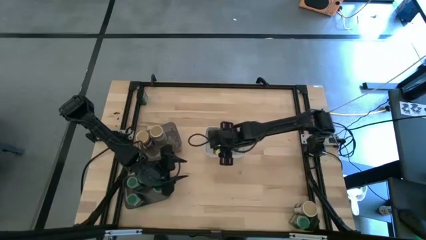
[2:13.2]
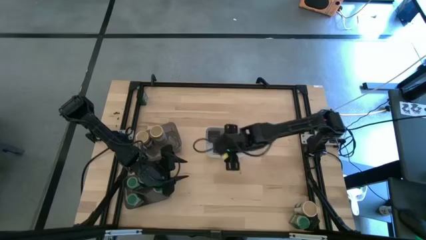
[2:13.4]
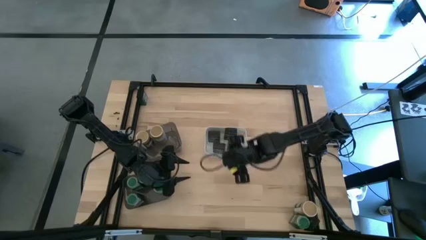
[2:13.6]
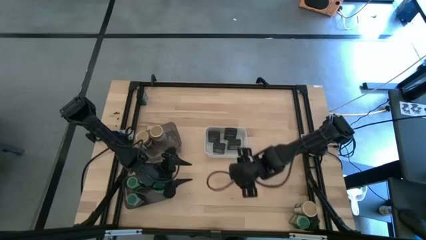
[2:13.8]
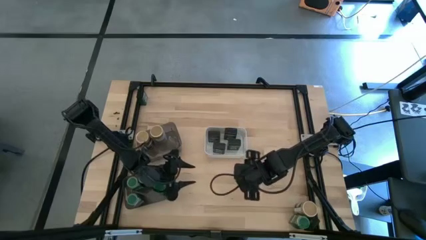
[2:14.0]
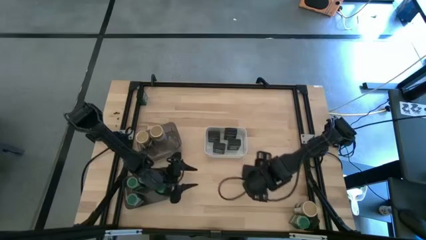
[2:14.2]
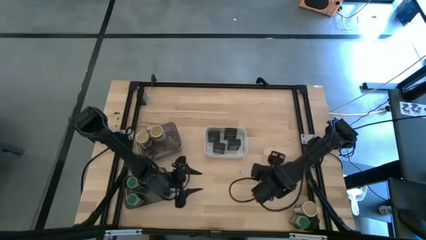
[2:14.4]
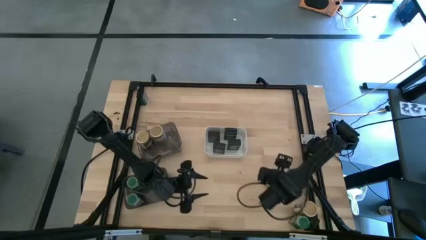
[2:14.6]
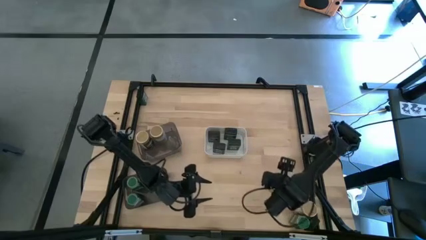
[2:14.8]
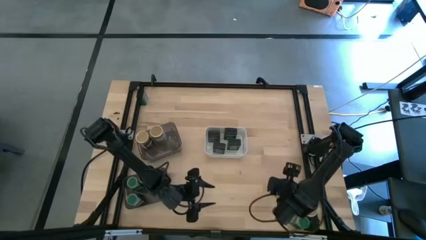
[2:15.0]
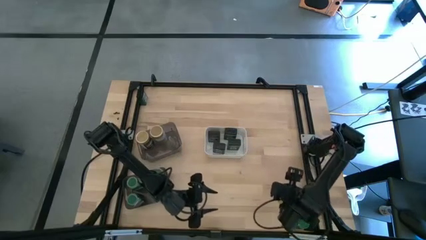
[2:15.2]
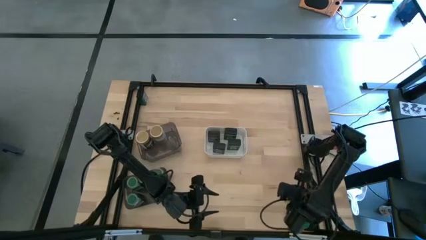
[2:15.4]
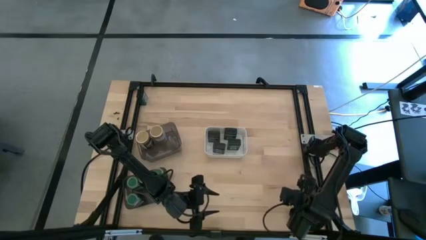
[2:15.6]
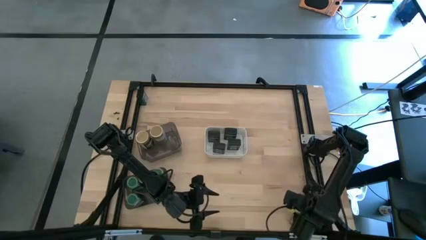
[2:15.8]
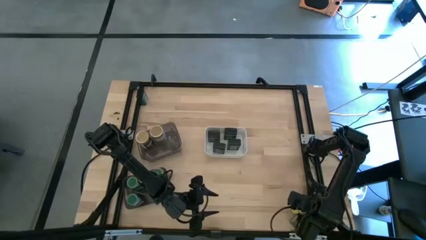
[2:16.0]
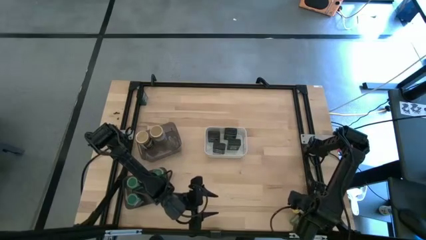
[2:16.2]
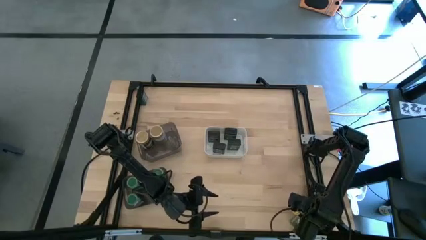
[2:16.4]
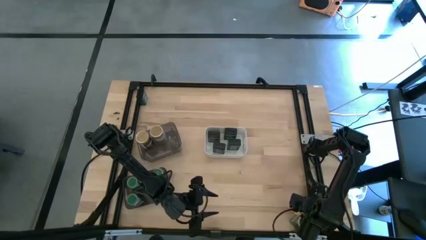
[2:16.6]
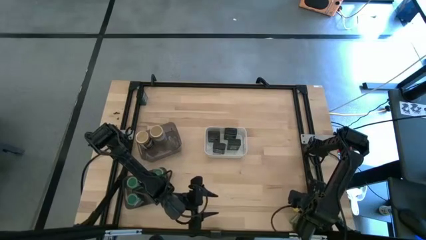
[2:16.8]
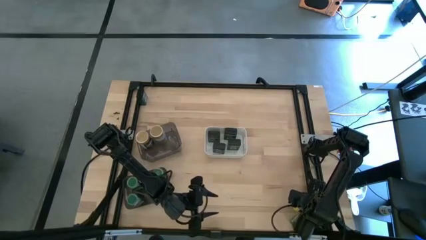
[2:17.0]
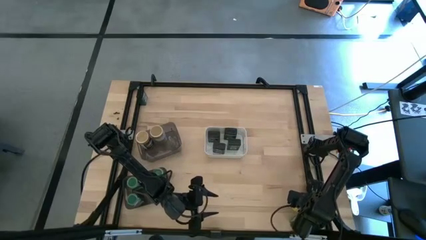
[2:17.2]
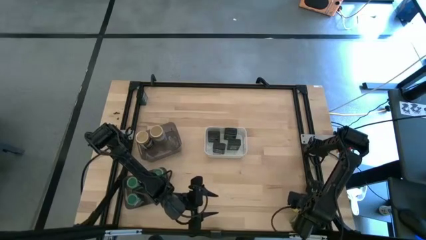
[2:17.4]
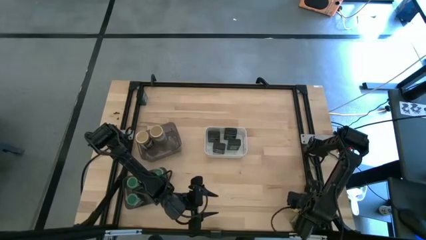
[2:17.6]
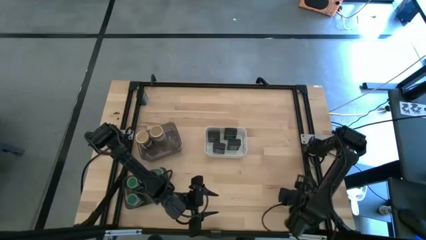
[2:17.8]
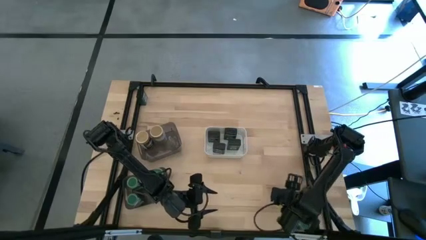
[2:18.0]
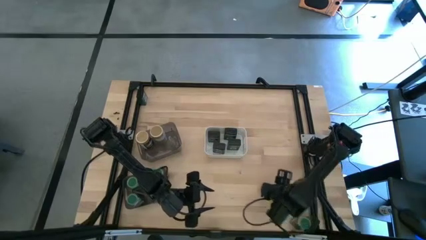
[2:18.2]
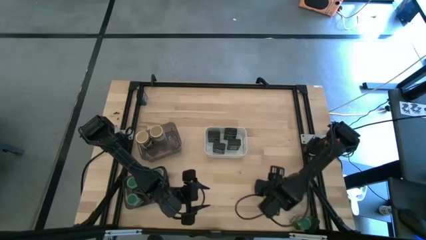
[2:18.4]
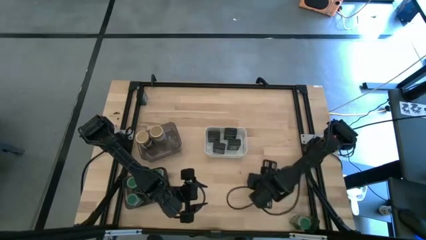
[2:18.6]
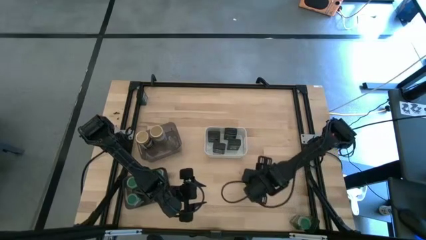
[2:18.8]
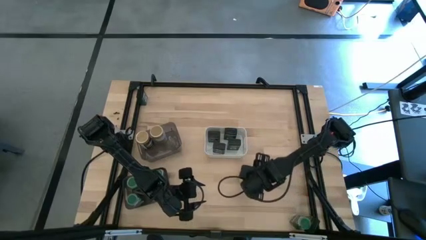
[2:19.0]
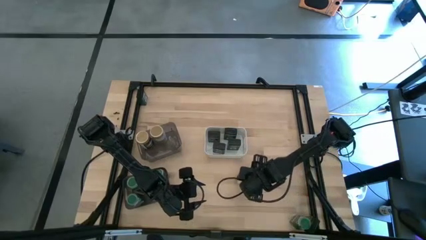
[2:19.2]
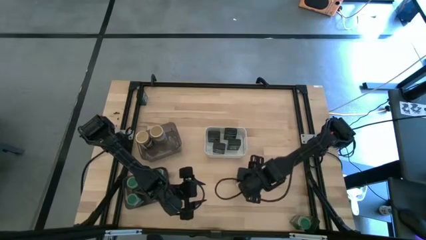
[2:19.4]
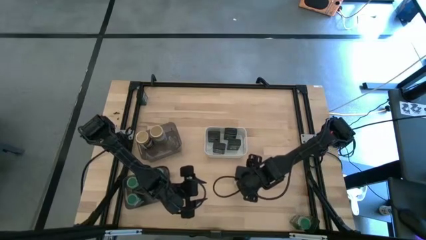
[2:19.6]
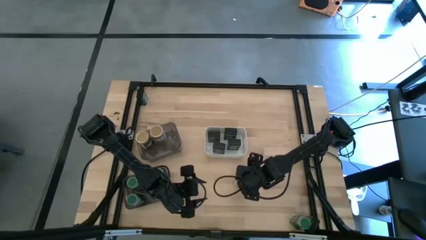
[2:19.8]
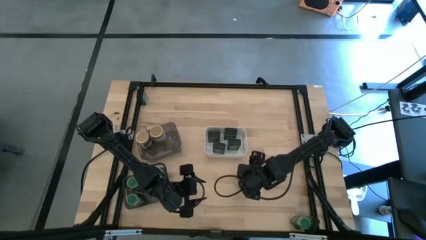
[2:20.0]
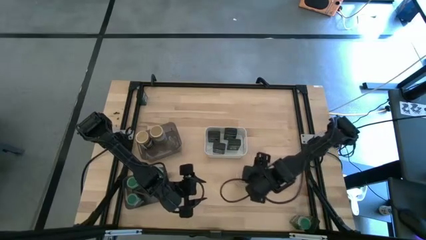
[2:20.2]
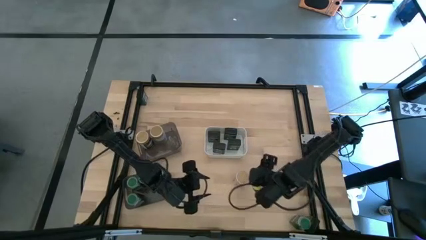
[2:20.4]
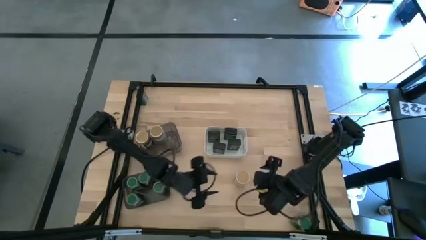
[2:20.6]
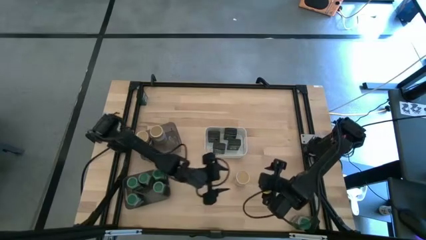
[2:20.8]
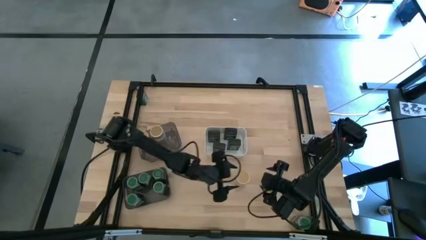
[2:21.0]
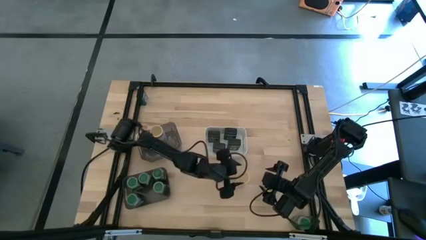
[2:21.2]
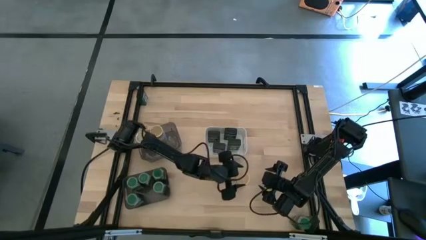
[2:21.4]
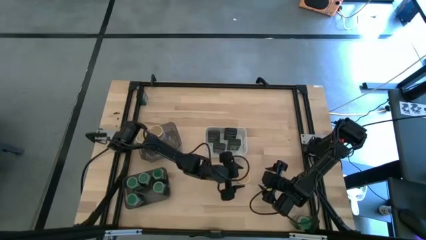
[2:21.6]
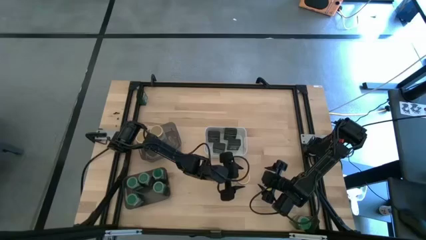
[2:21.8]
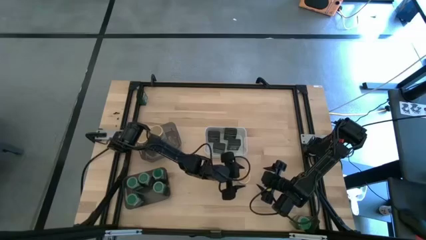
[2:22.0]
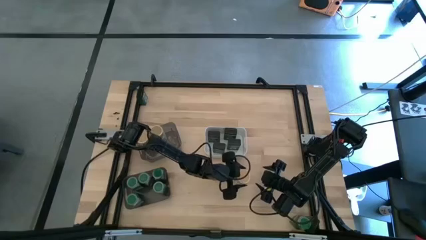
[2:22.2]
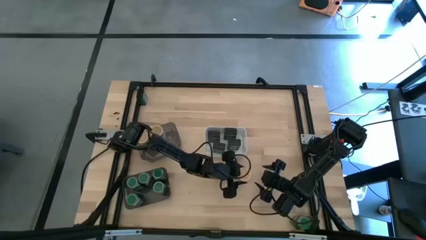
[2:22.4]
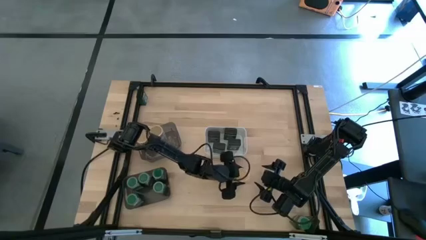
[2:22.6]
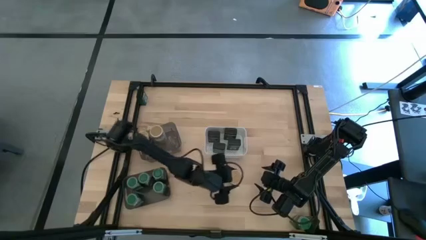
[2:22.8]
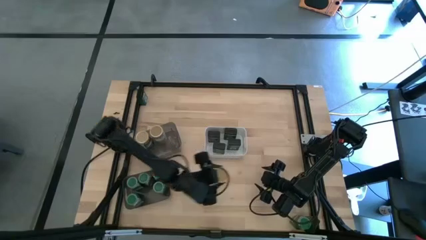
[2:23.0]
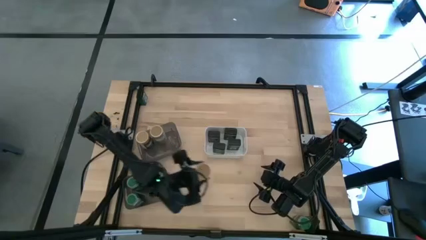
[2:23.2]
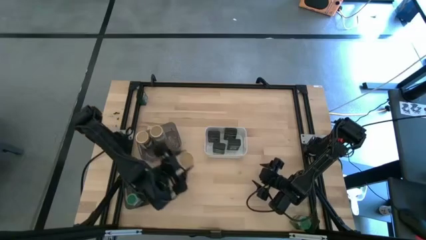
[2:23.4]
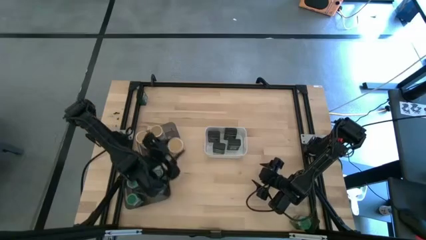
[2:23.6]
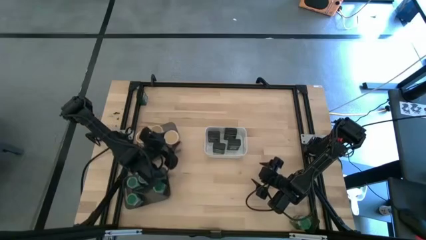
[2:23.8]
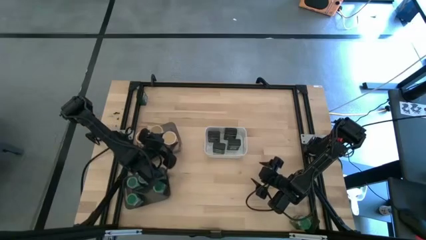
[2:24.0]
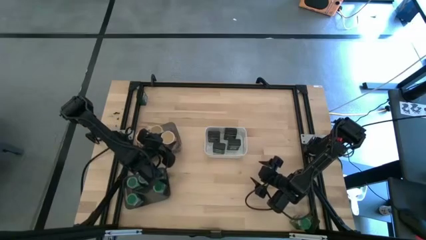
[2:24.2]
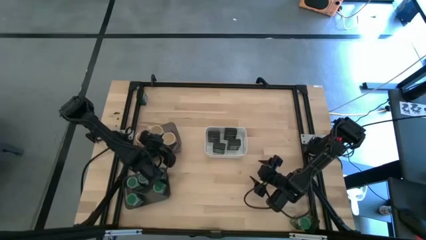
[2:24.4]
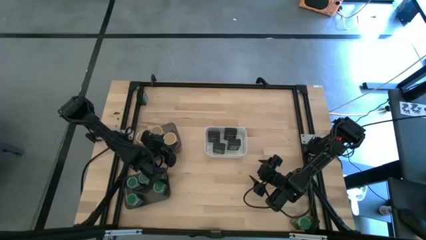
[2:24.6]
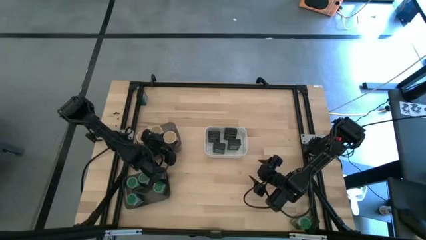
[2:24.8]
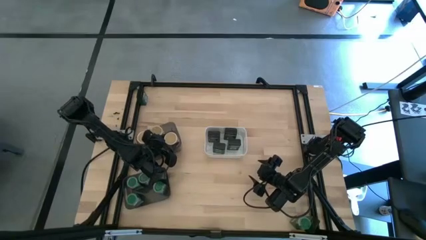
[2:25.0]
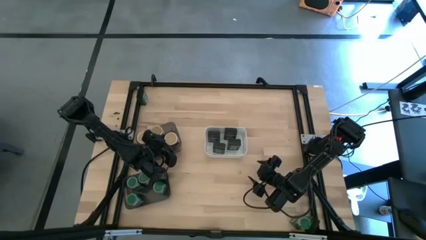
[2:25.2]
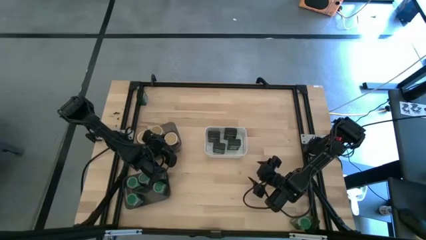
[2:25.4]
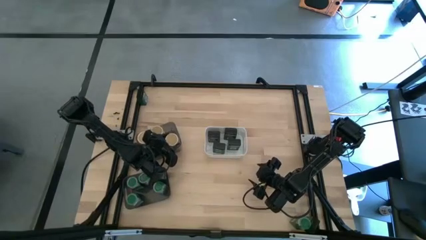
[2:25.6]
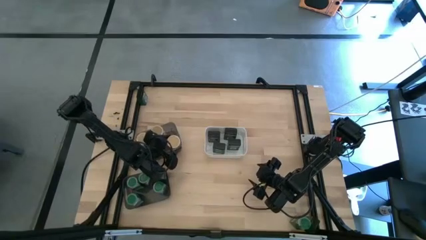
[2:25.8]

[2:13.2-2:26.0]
Task: Sort spices by type
Put the gold seasoning bottle into the top black bin
